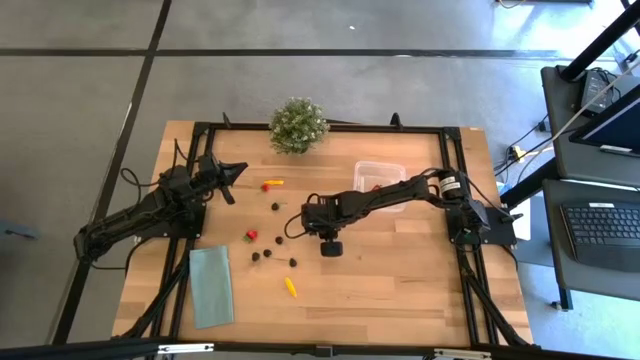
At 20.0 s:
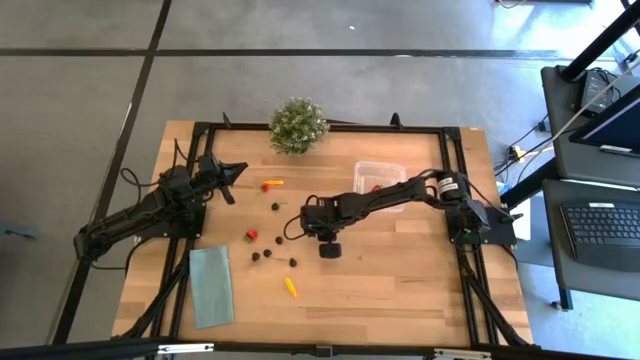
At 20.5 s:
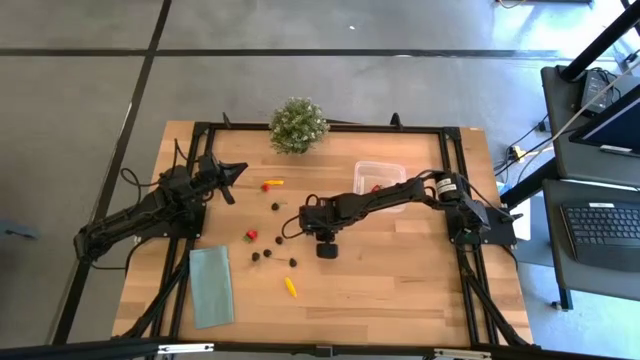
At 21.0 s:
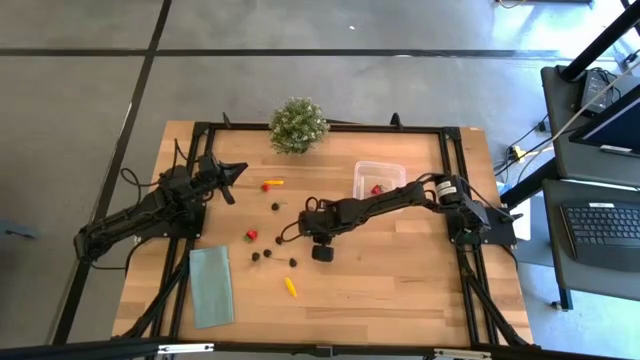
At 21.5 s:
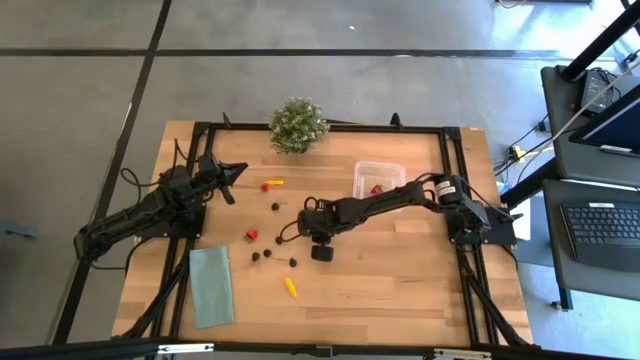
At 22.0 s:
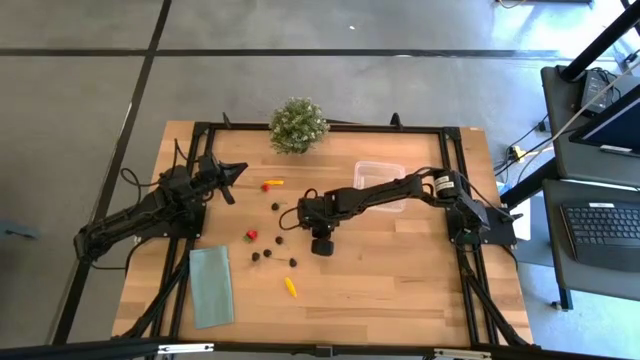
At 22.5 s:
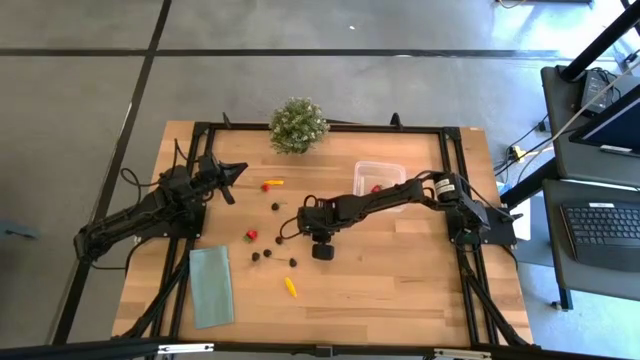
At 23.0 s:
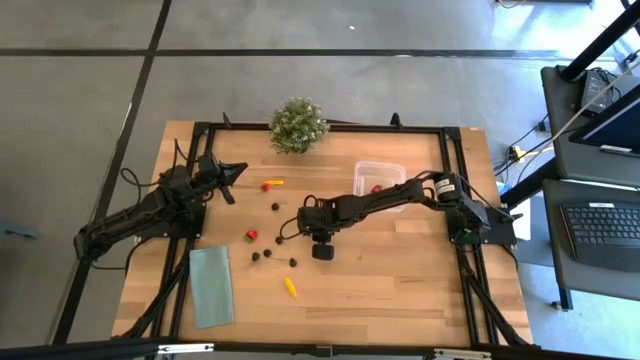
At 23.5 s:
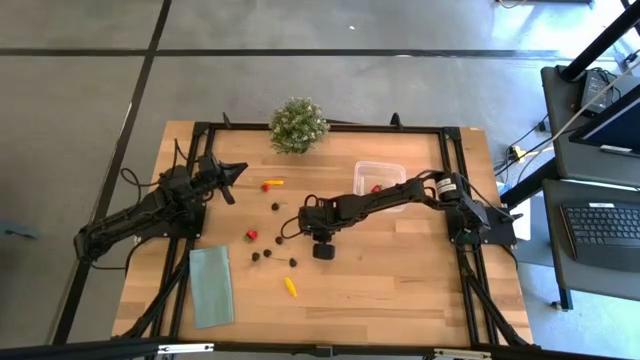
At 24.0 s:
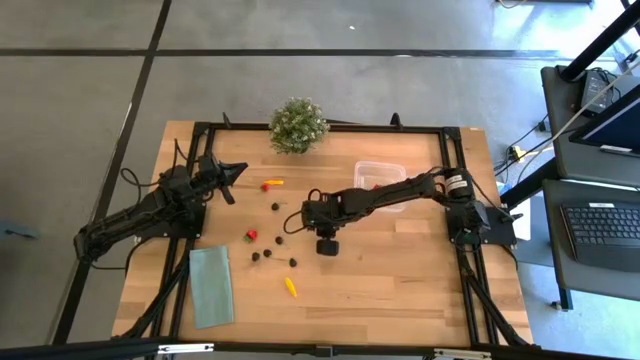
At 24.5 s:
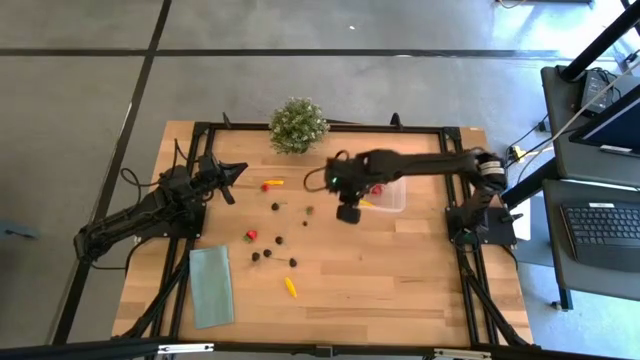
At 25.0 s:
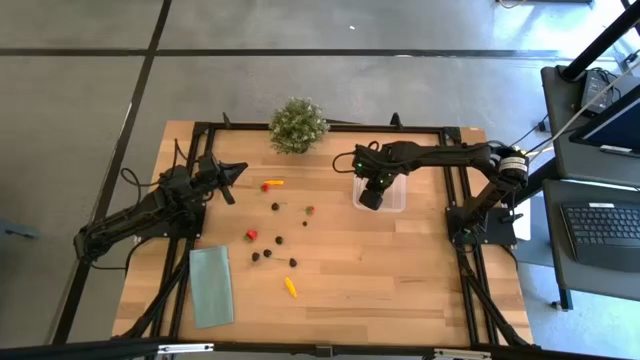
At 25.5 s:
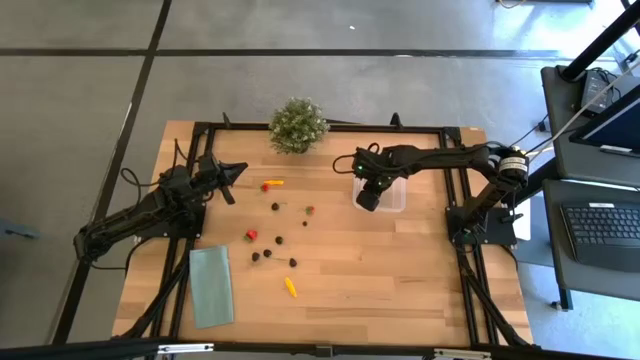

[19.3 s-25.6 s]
Task: Pick and placing Produce into tupperware
Put the right blueberry into the transparent bin

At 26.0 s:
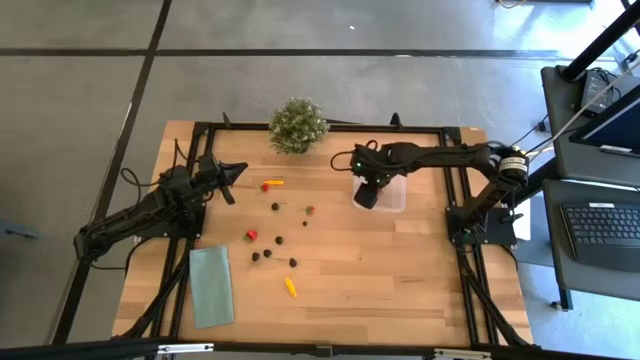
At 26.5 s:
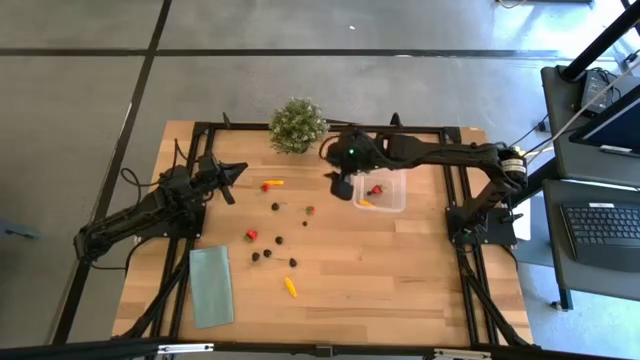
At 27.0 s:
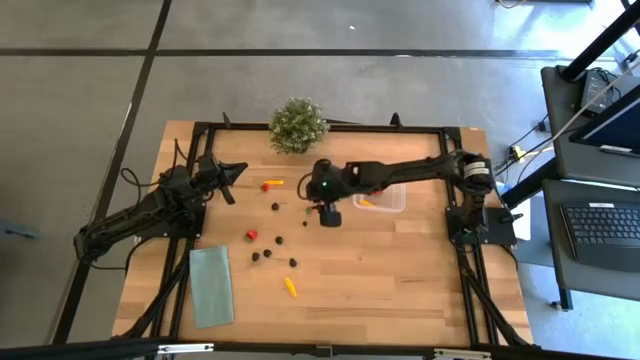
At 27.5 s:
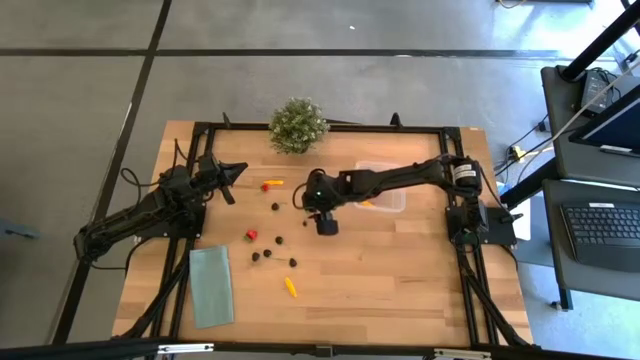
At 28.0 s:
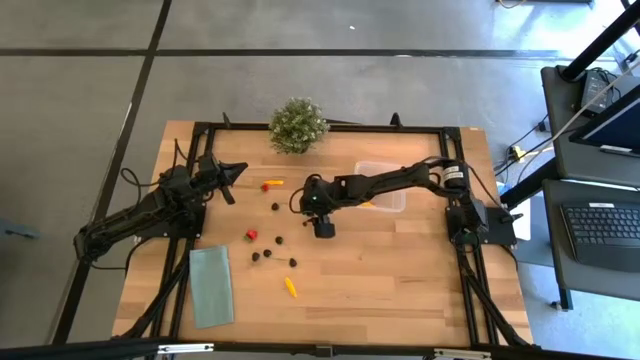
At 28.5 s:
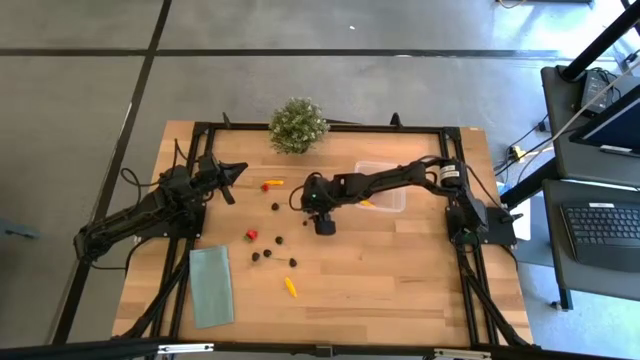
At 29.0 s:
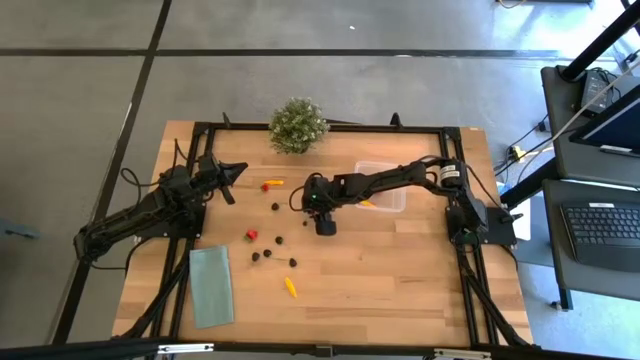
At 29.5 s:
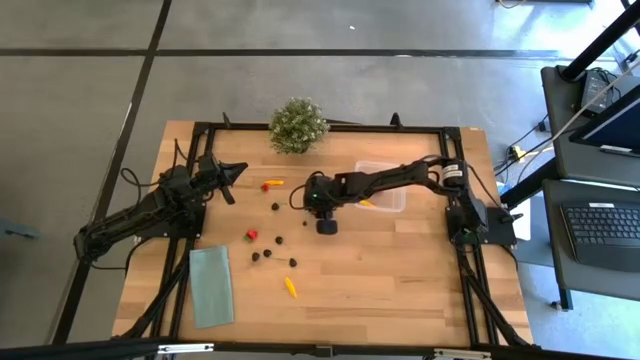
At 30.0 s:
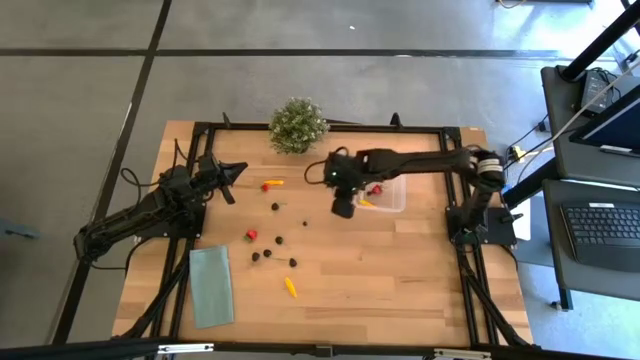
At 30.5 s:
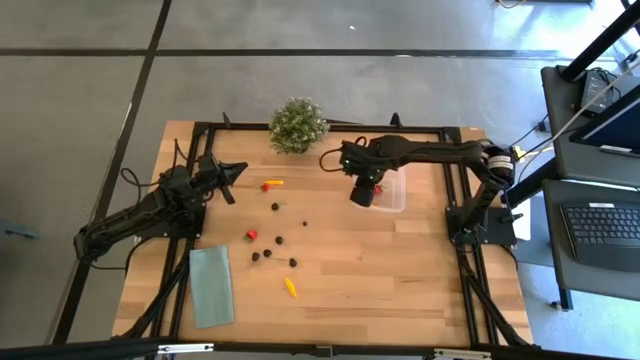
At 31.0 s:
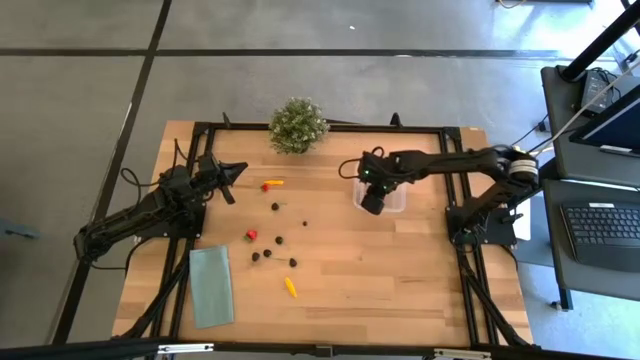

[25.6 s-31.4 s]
Put the middle strawberry into the transparent bin

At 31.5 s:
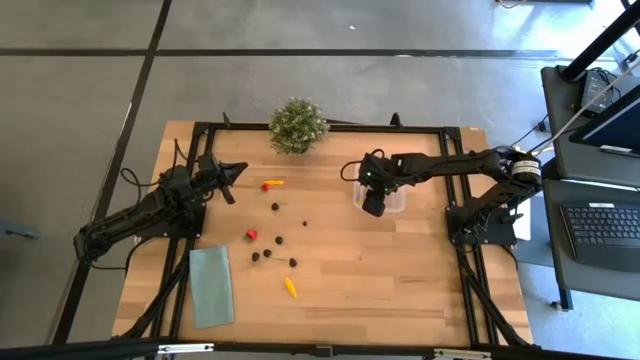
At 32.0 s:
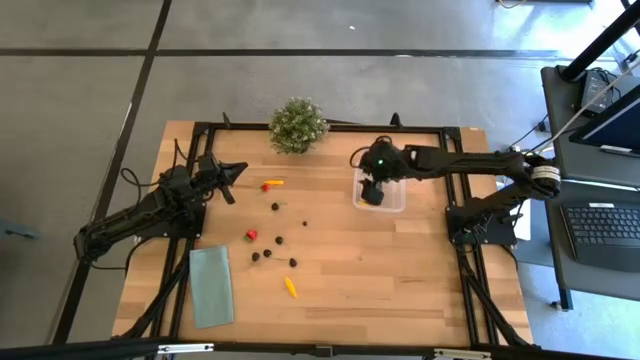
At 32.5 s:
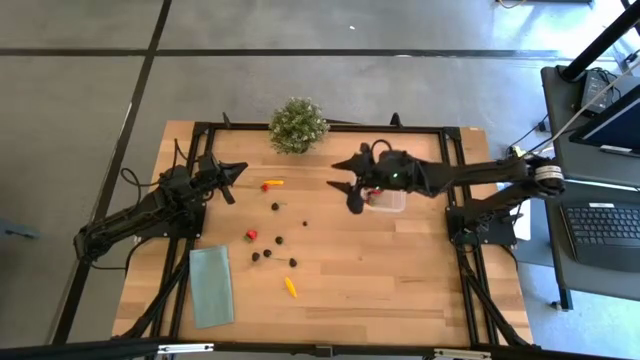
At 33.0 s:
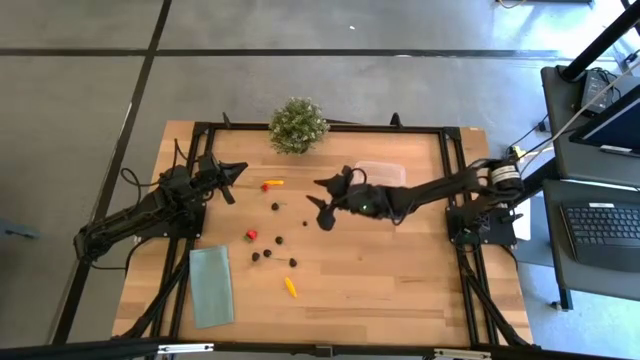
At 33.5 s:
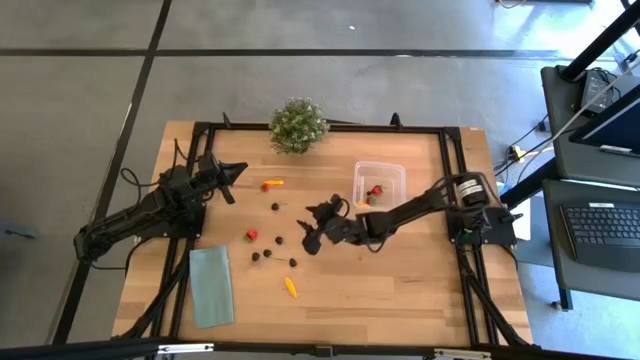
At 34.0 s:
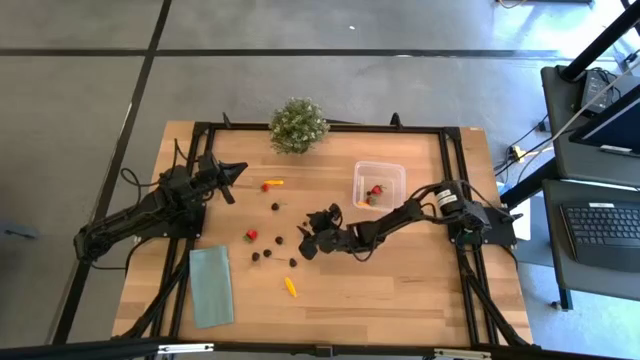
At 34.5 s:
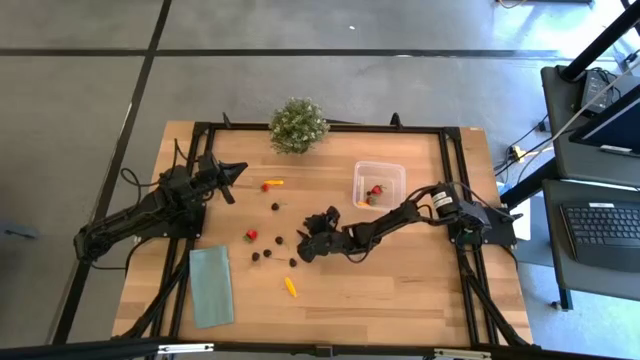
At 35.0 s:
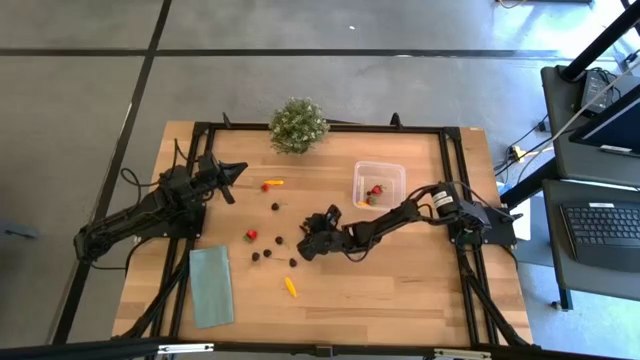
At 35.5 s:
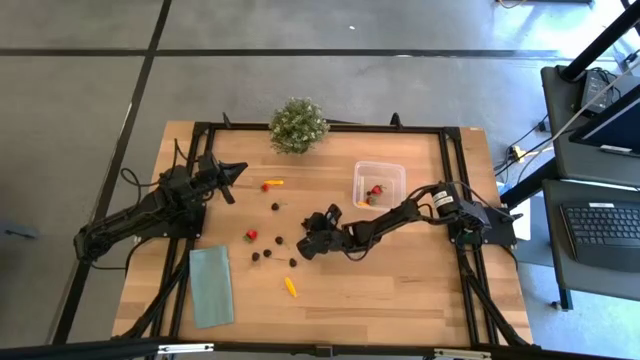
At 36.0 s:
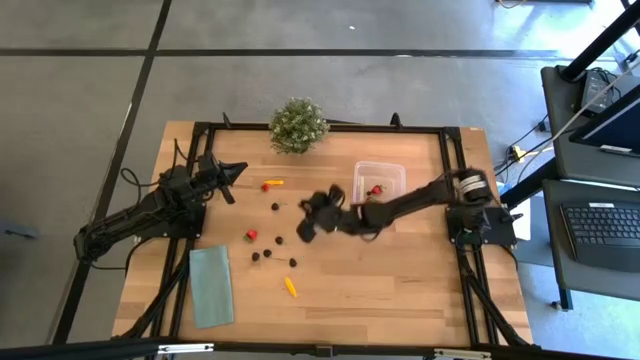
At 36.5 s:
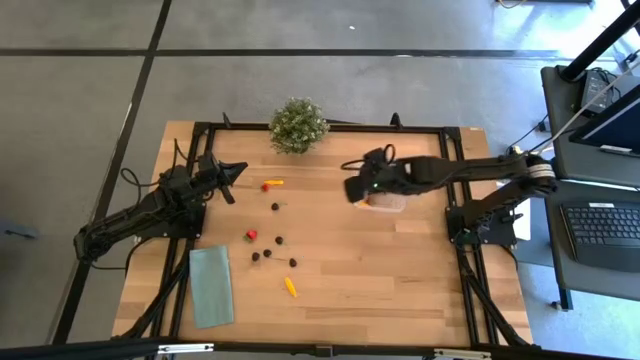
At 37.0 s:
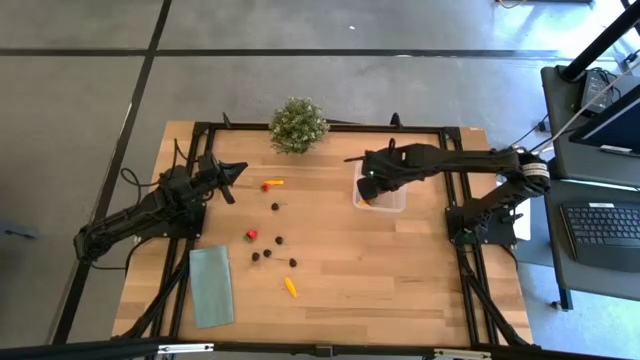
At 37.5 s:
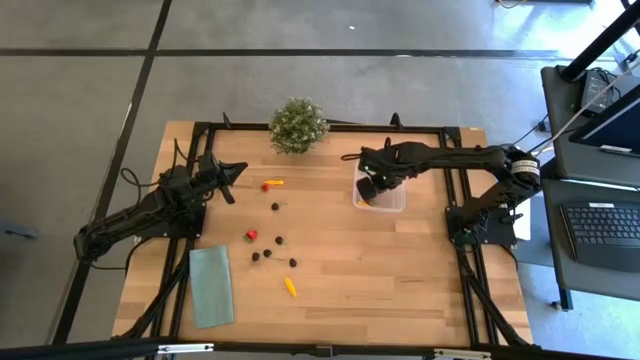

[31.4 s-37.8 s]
Put the blueberry into the transparent bin

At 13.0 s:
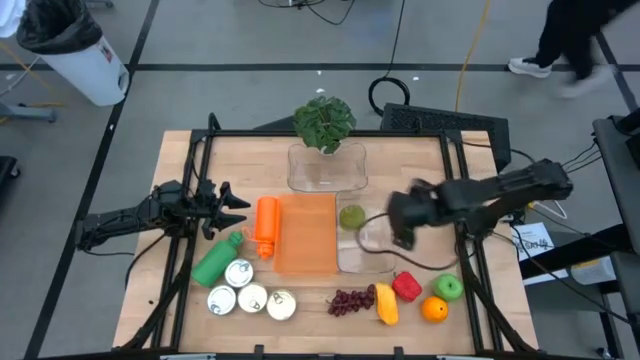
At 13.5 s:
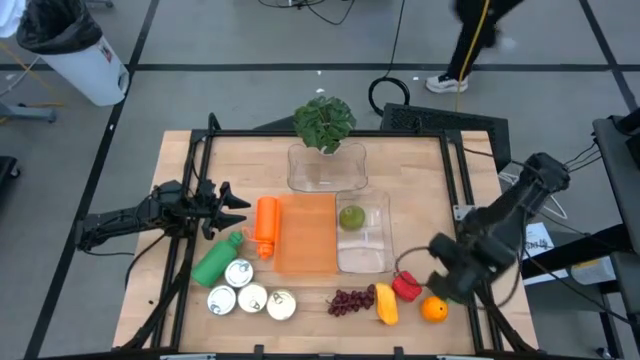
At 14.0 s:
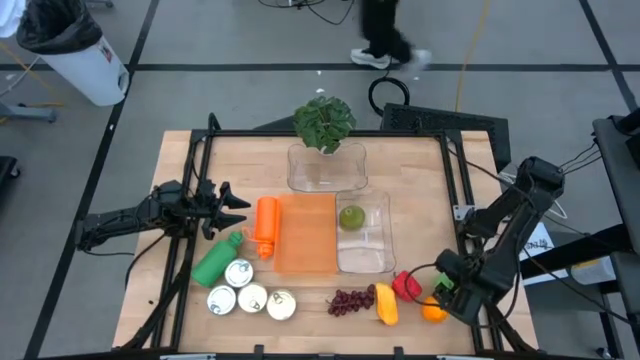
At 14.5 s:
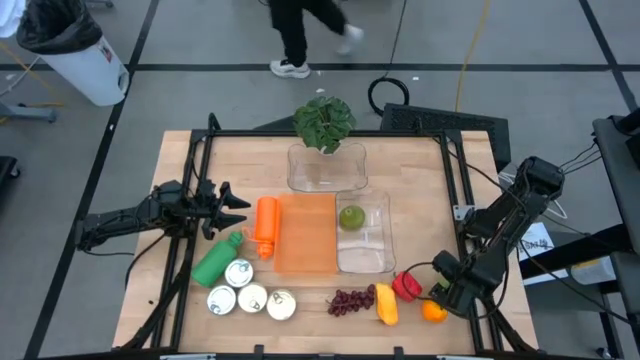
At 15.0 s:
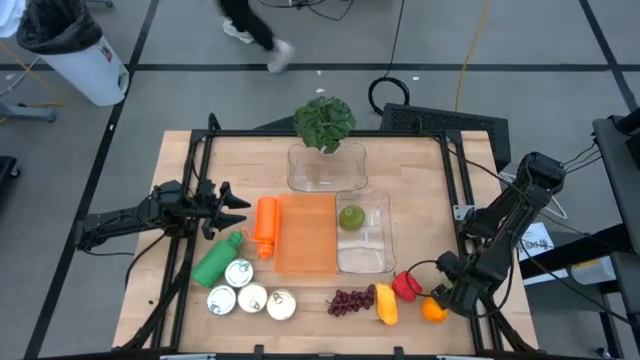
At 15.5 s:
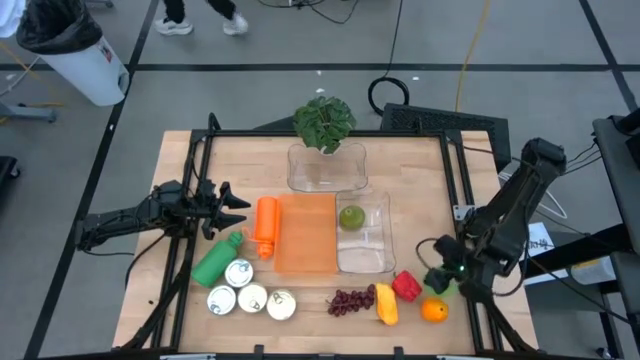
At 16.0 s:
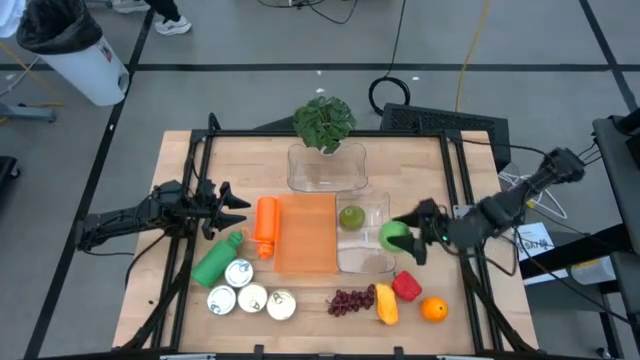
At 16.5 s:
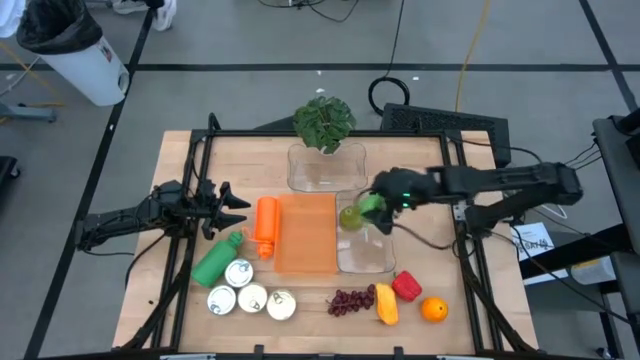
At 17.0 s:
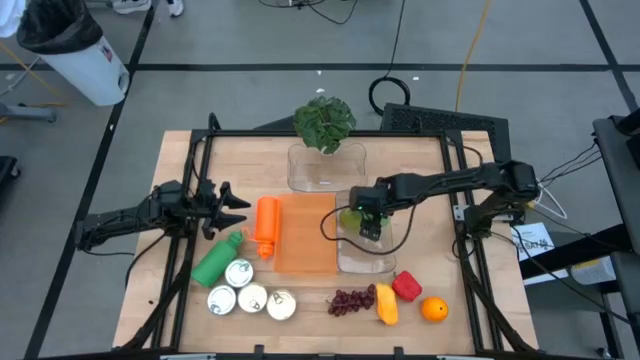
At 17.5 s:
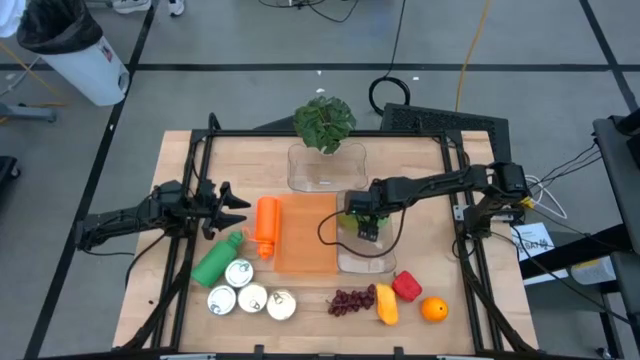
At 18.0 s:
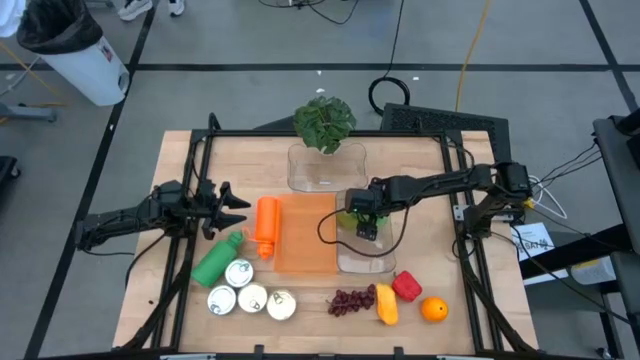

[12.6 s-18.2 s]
Task: Pick & Place Food Item
Put the green apple into the bottom transparent bin
